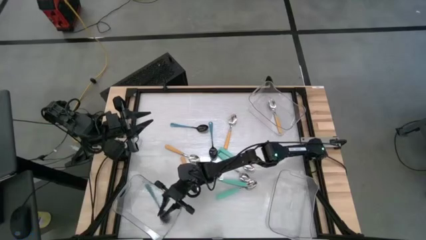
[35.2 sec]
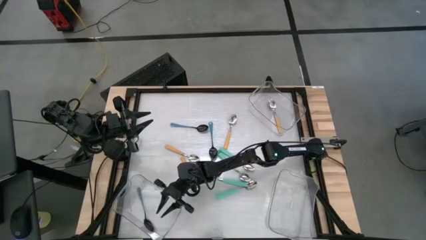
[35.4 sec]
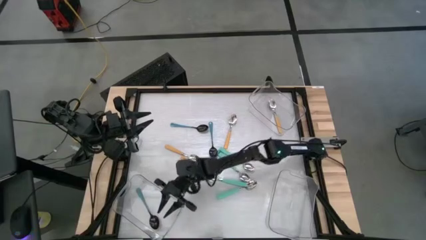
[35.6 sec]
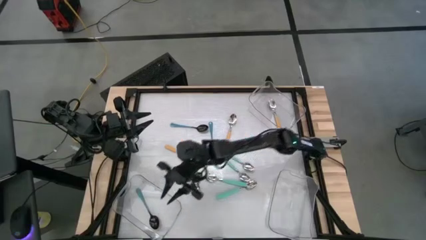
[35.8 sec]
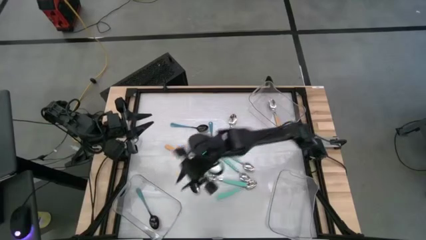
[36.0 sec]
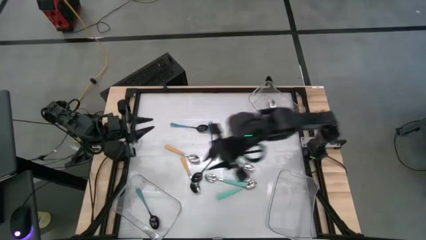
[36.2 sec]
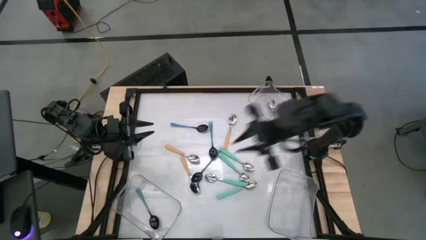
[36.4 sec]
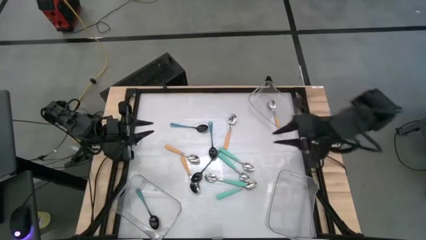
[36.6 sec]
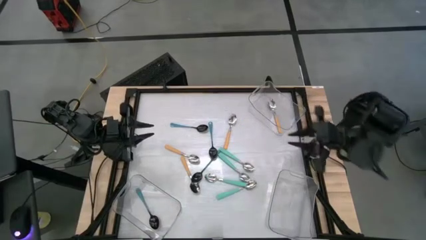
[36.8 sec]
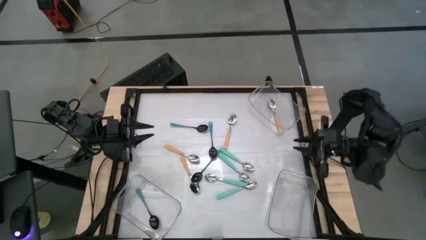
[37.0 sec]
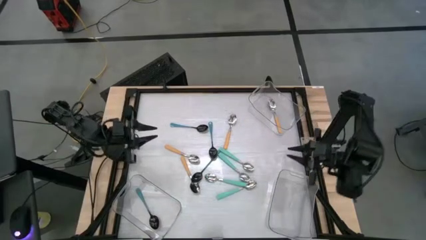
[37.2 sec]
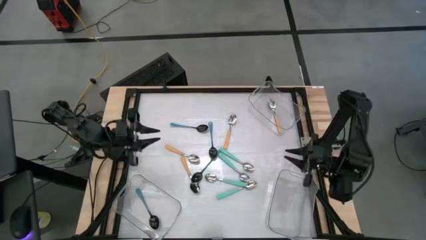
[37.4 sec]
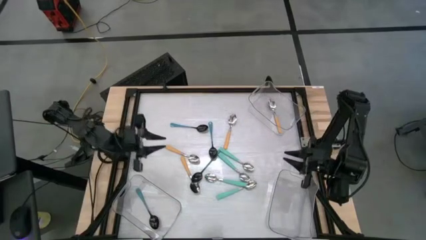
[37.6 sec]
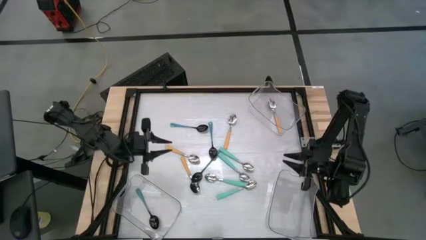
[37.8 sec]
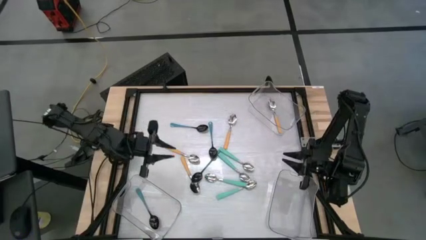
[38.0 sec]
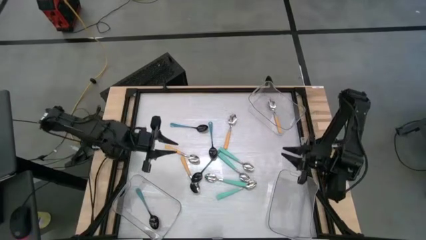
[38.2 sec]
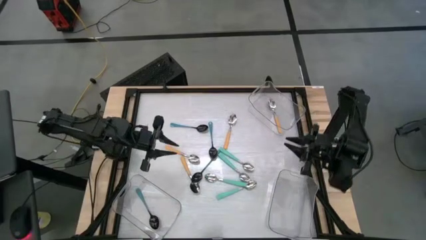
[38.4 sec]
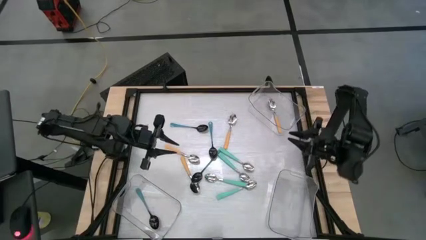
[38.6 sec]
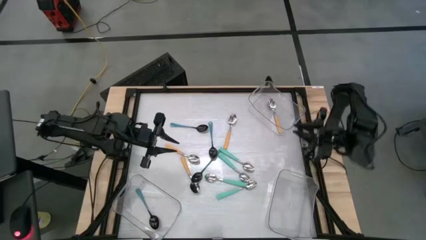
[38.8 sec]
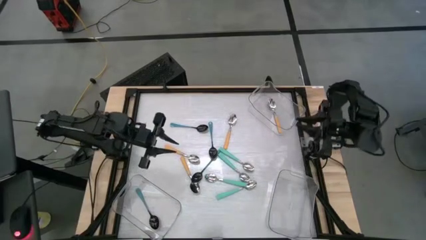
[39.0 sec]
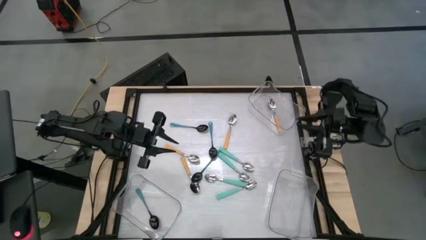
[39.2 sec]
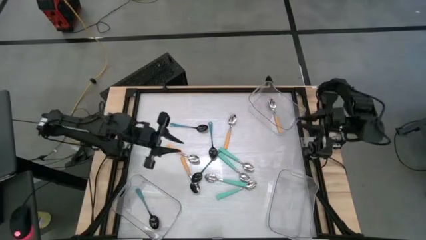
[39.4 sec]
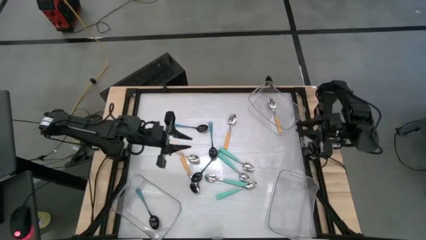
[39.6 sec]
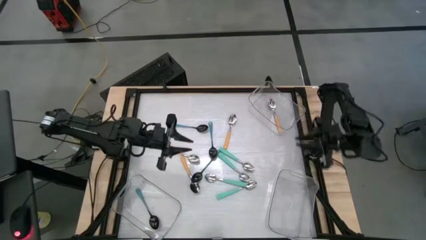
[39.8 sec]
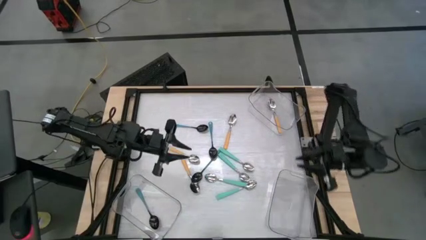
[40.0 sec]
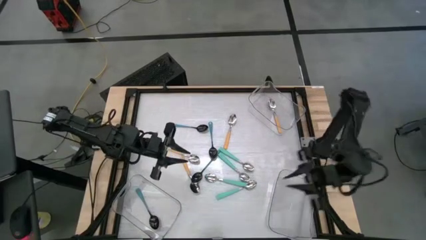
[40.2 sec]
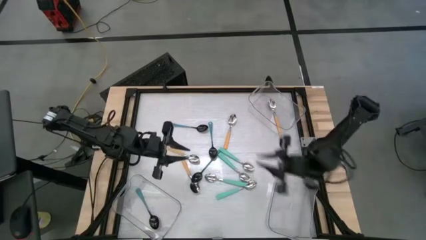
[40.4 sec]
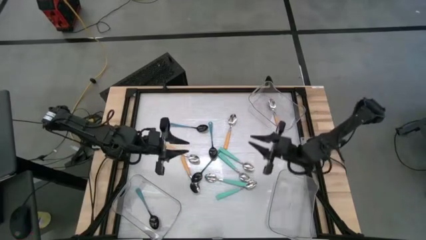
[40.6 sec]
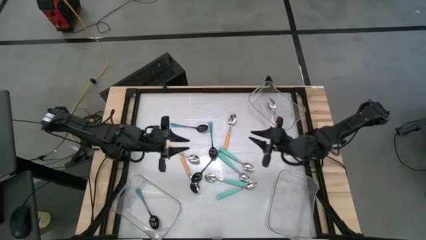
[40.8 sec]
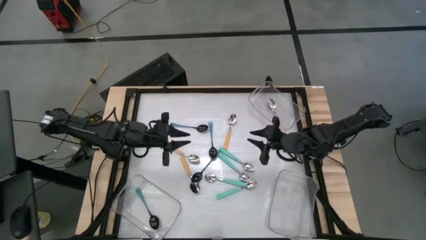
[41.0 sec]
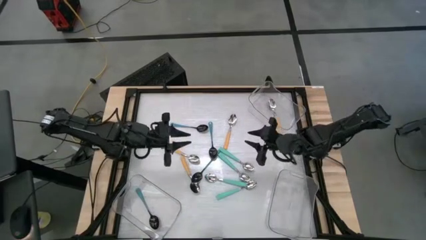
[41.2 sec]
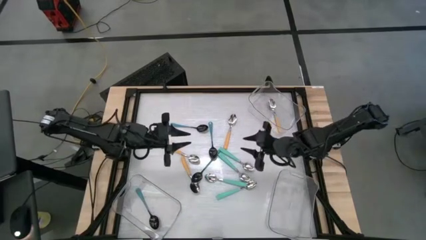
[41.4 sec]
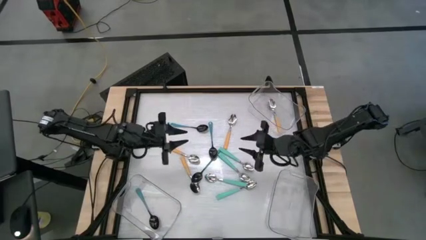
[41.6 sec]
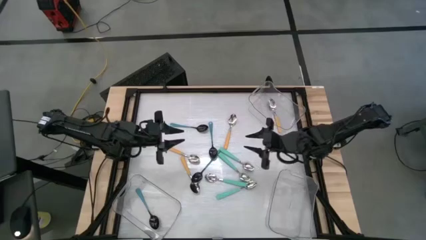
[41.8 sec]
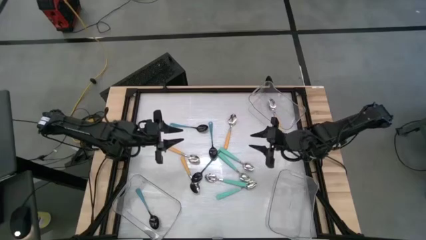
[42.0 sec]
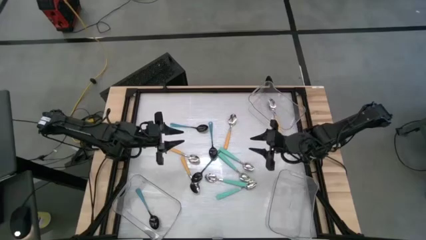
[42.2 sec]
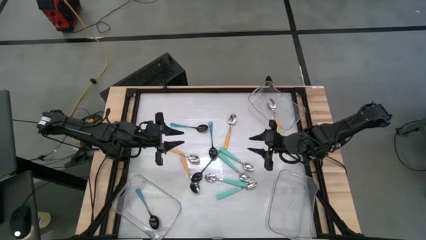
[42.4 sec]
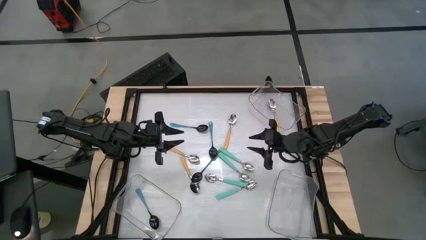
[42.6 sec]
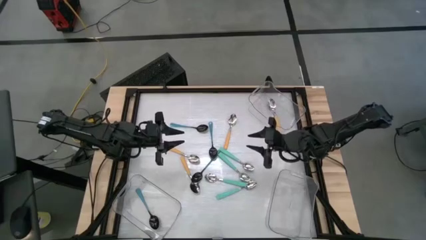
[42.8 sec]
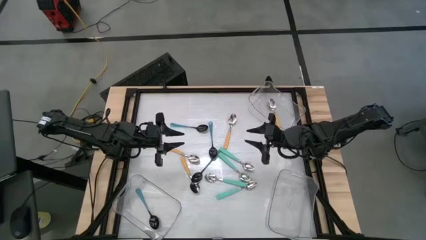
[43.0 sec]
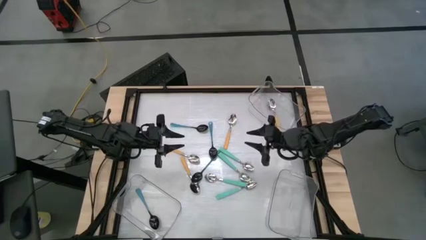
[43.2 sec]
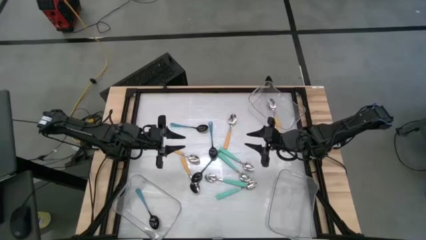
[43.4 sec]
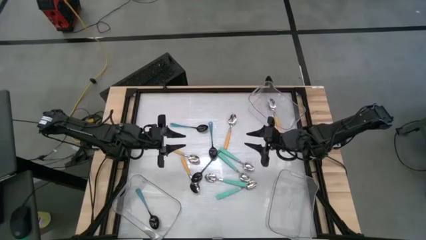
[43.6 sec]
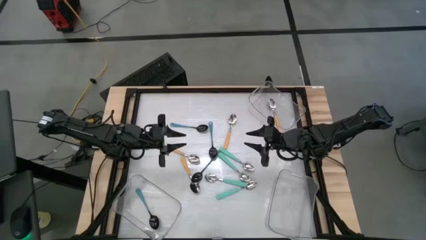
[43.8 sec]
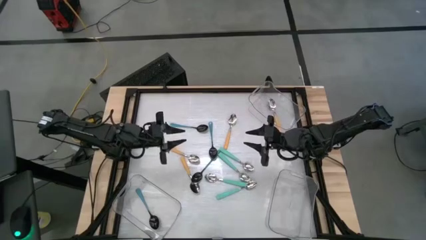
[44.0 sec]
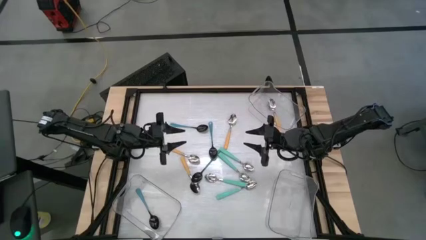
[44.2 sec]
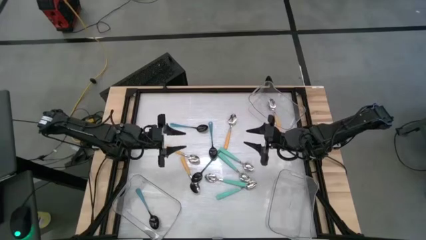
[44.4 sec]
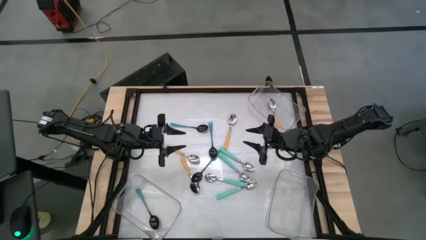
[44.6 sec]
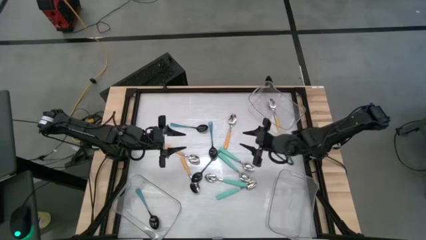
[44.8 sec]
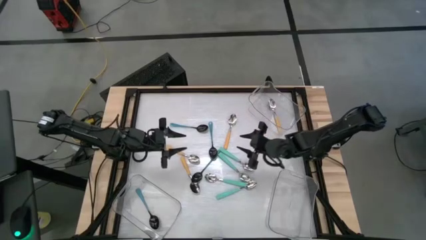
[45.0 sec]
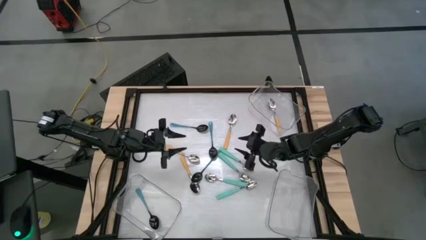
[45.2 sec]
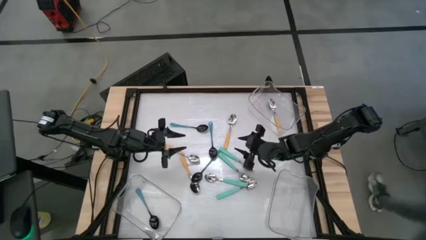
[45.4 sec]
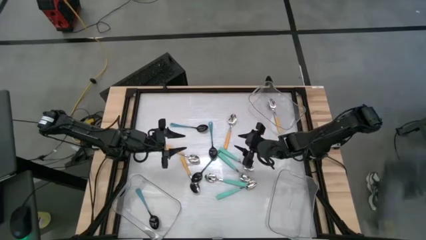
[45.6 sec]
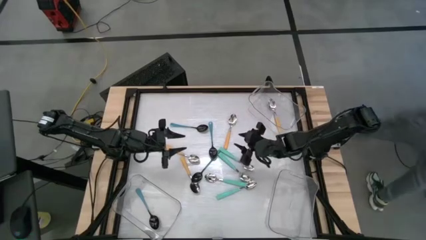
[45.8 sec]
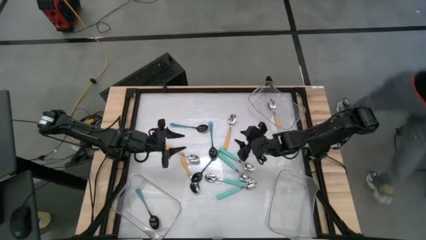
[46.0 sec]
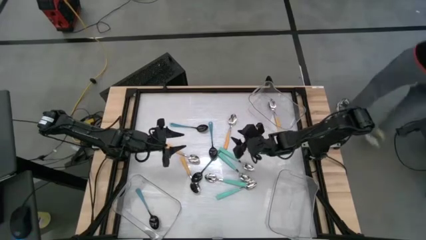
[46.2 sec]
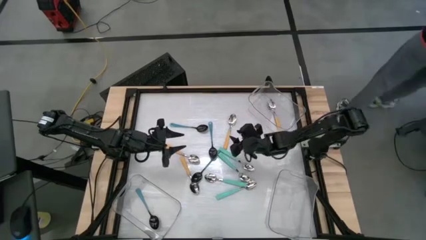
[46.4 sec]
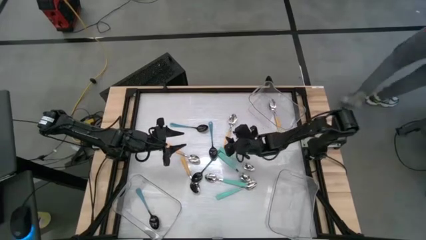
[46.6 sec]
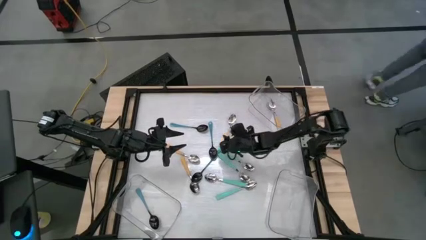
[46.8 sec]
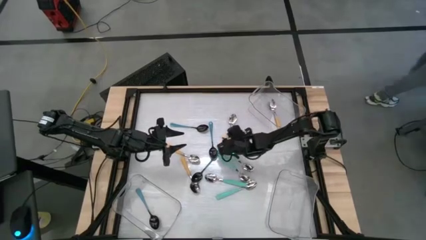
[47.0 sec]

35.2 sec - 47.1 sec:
Task: Sort silverware by color (type)
Put the yellow spoon into the top transparent bin
